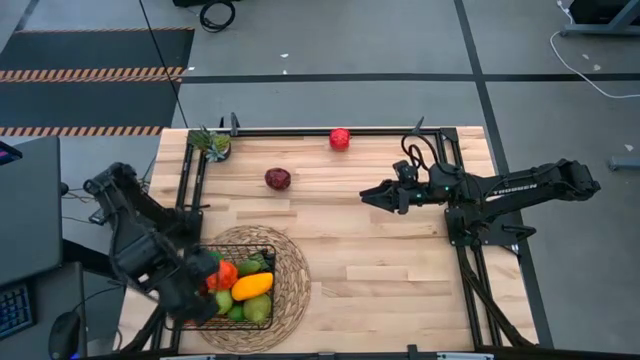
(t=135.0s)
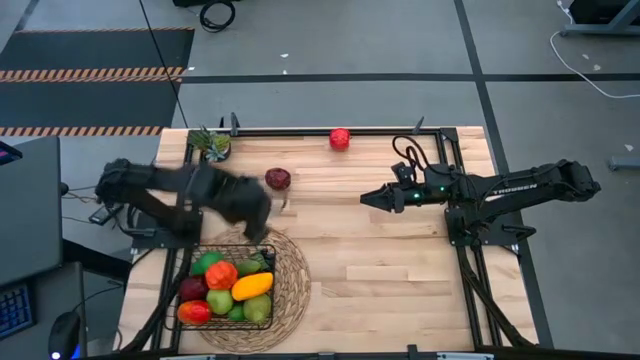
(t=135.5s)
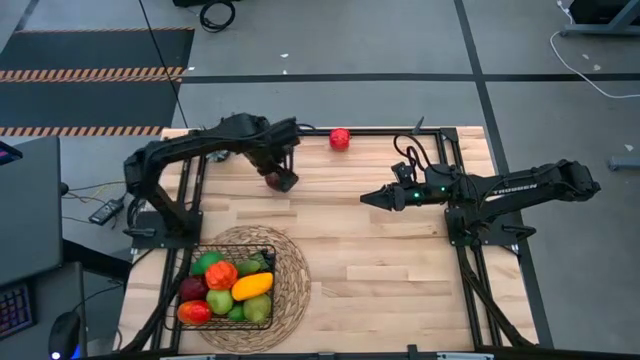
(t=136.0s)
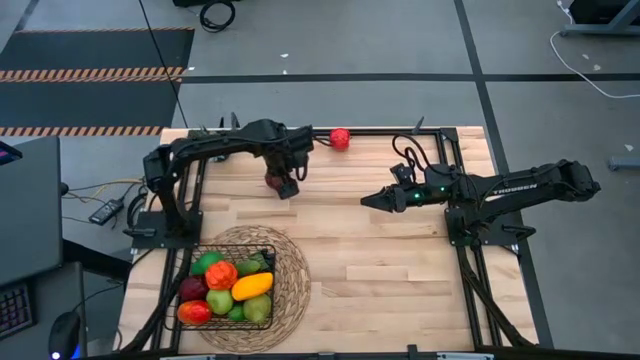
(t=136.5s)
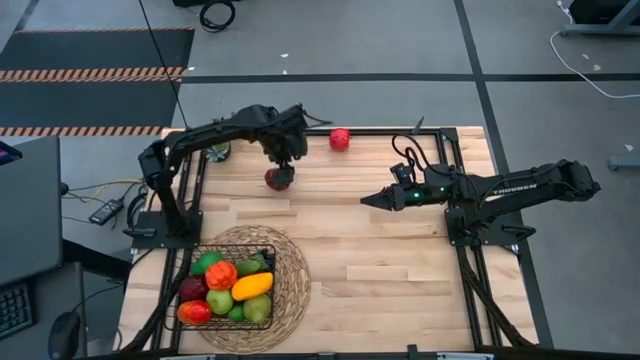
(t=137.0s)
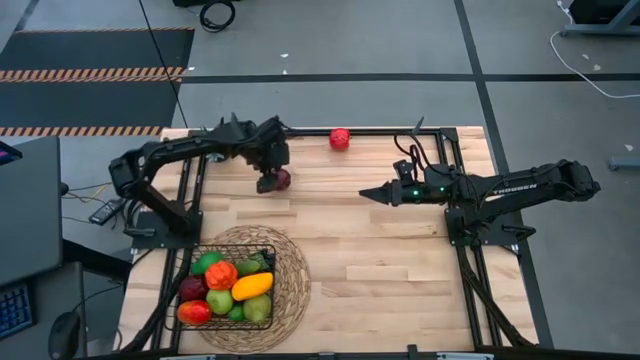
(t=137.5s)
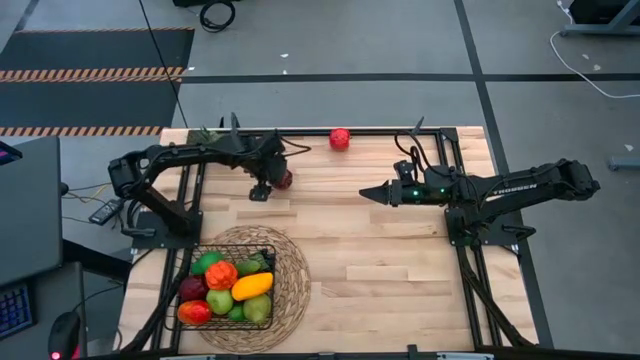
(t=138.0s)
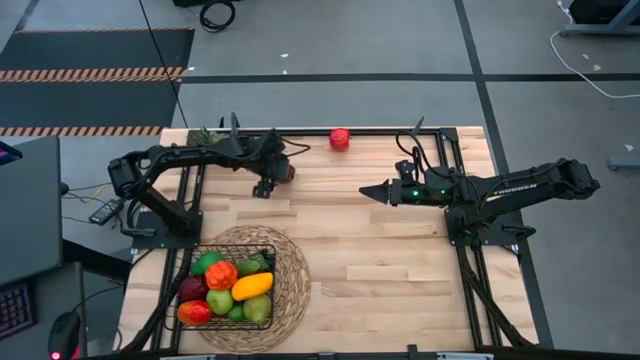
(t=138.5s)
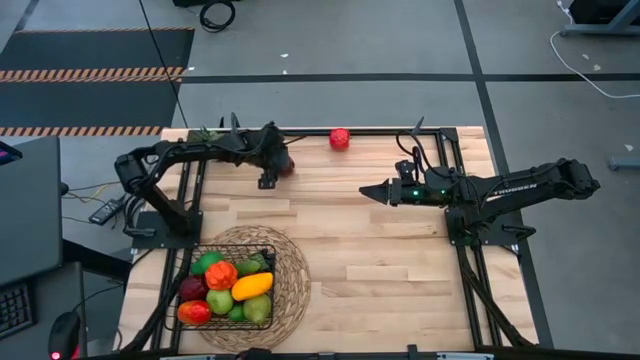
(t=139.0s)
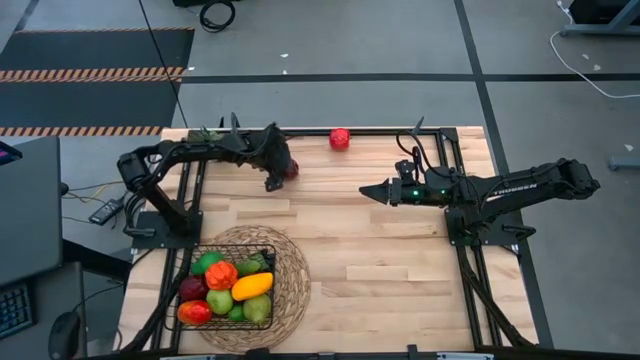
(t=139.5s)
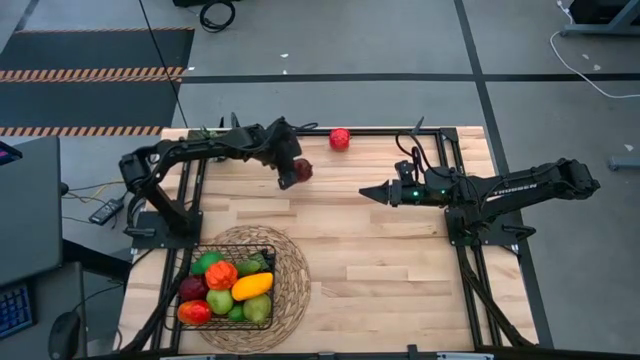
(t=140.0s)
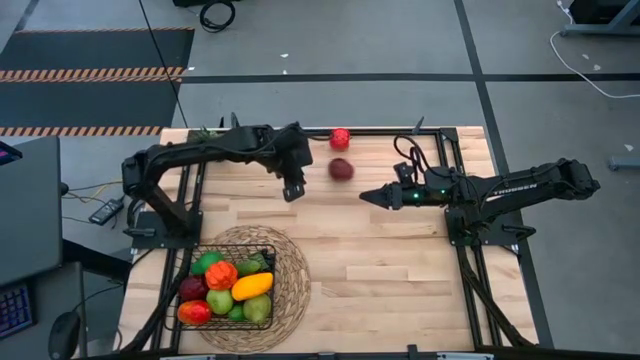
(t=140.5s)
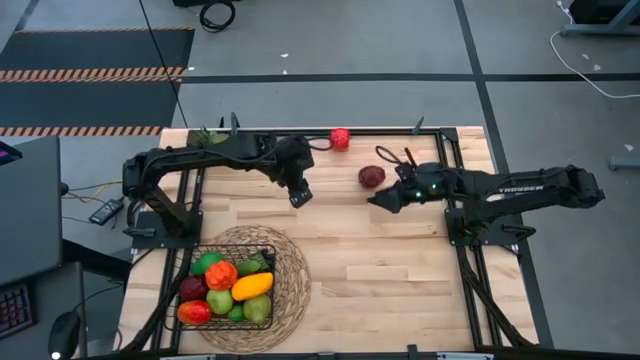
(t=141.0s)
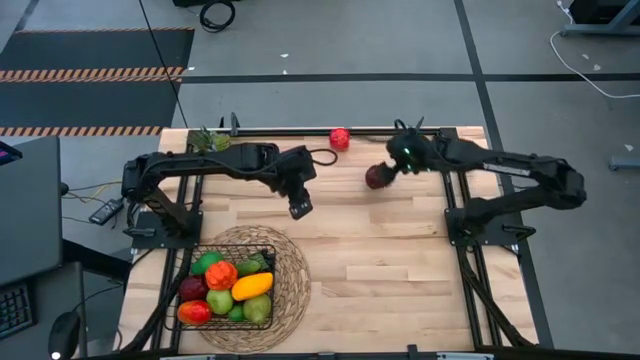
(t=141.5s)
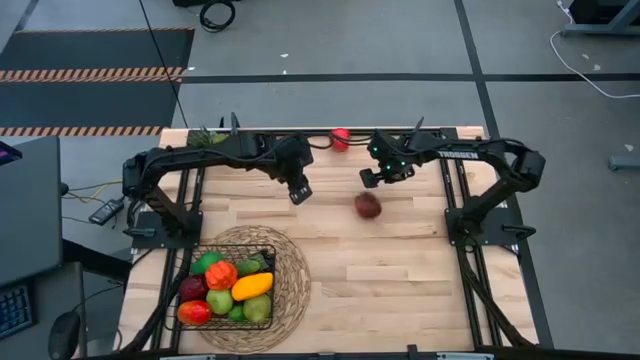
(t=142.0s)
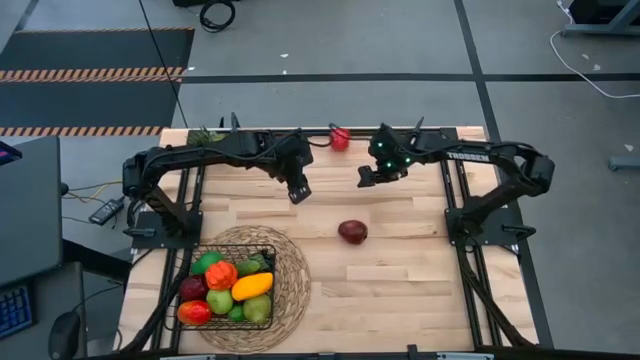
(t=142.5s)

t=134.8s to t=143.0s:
Task: Build produce basket
Put the dark red apple into the black wire basket

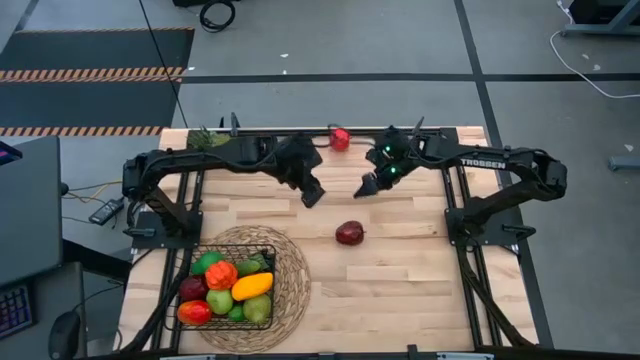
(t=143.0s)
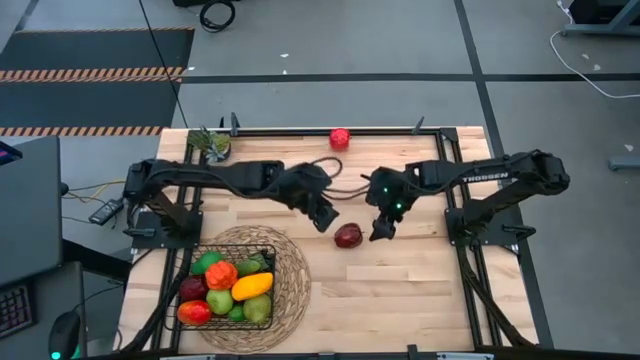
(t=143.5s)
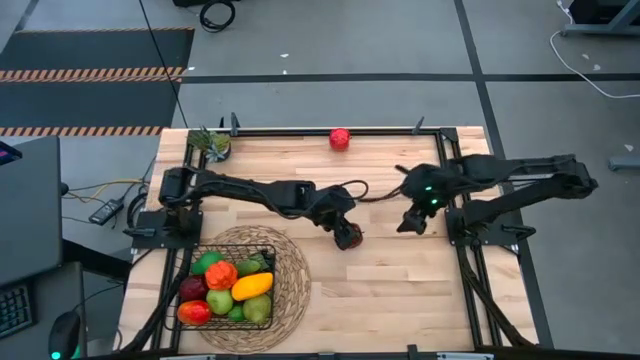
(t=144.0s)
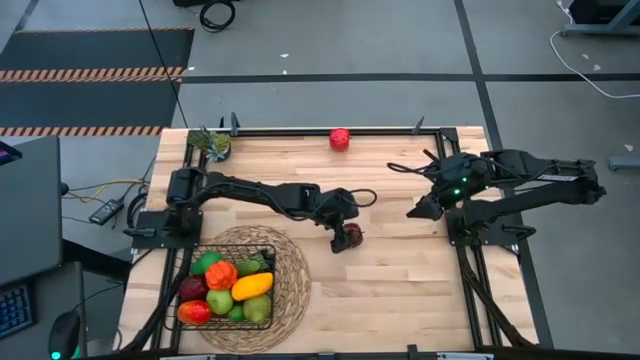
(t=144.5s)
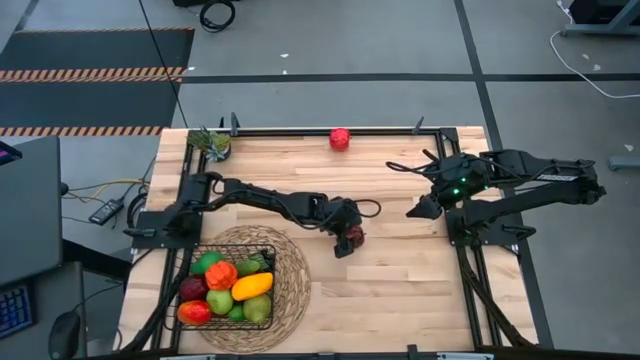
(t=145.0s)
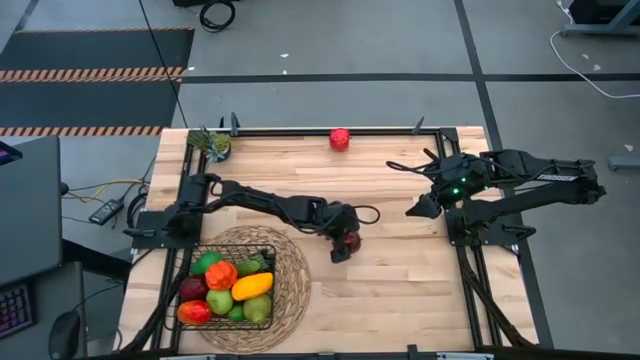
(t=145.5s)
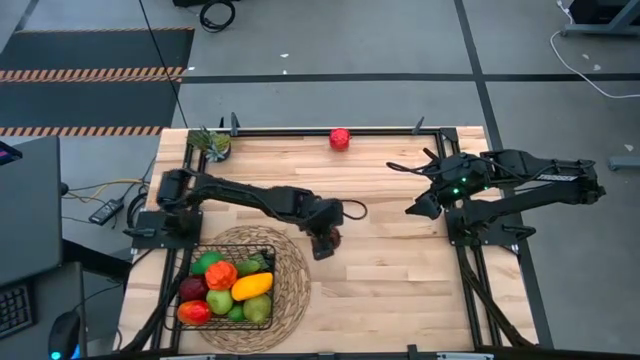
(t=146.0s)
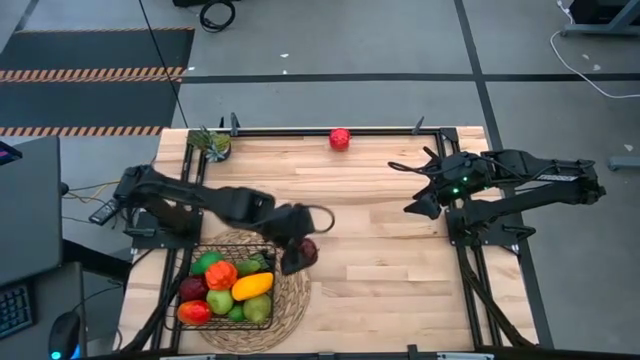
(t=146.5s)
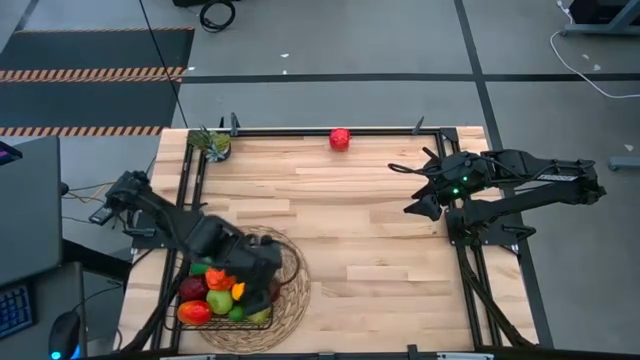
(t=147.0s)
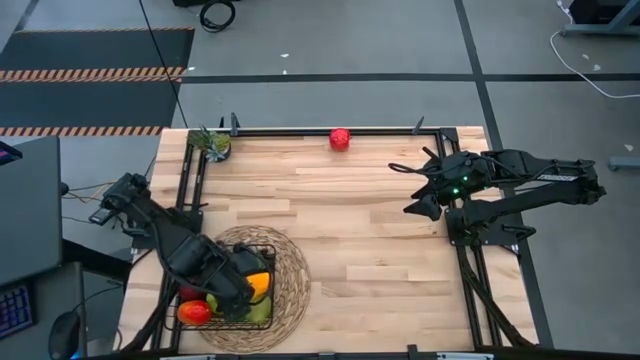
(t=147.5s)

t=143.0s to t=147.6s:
Put the dark red apple into the black wire basket

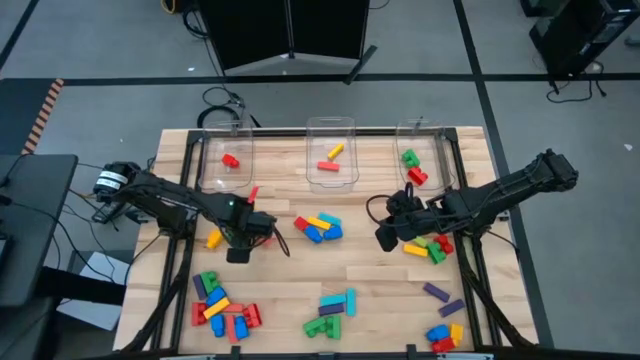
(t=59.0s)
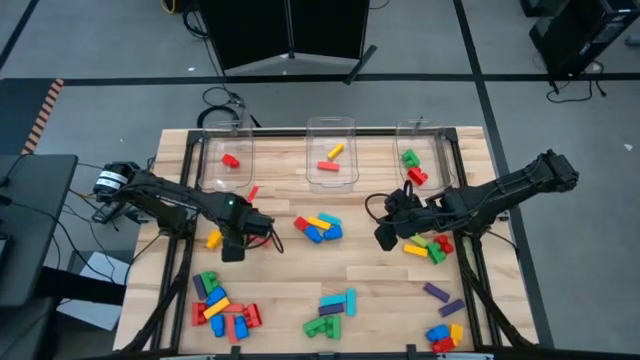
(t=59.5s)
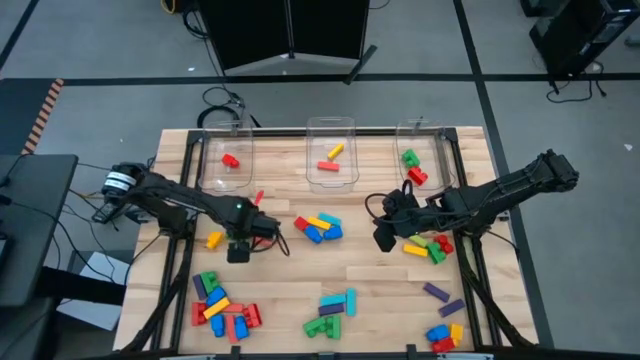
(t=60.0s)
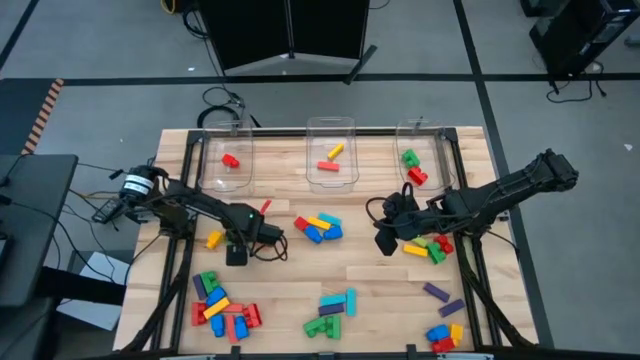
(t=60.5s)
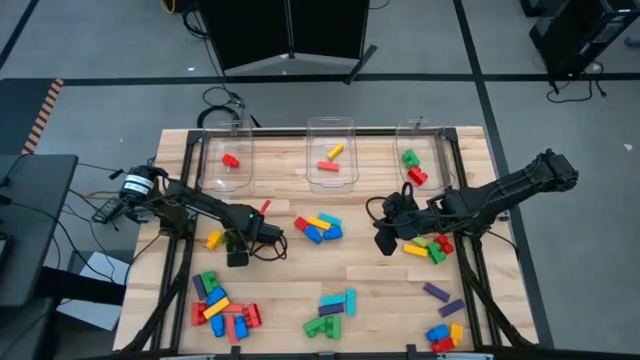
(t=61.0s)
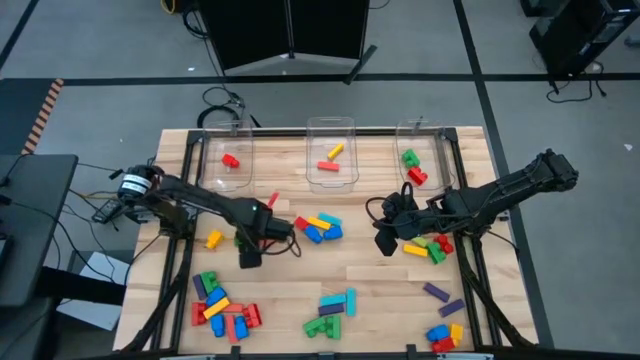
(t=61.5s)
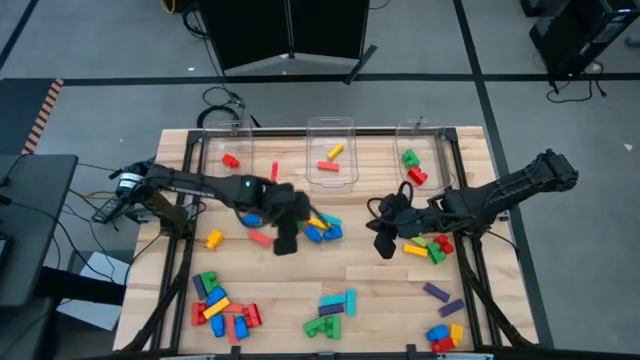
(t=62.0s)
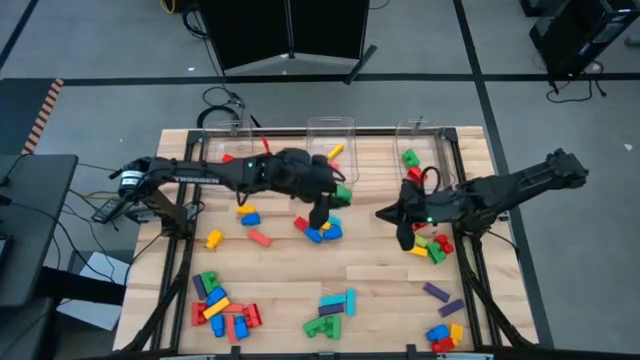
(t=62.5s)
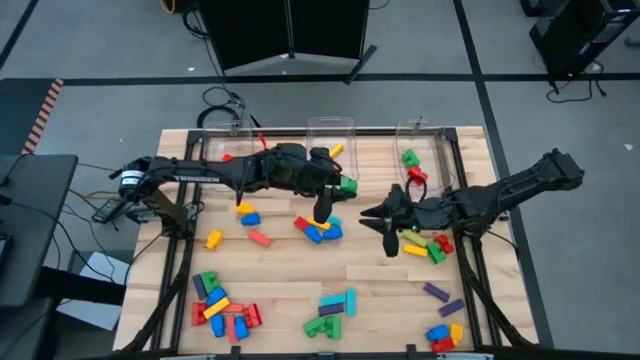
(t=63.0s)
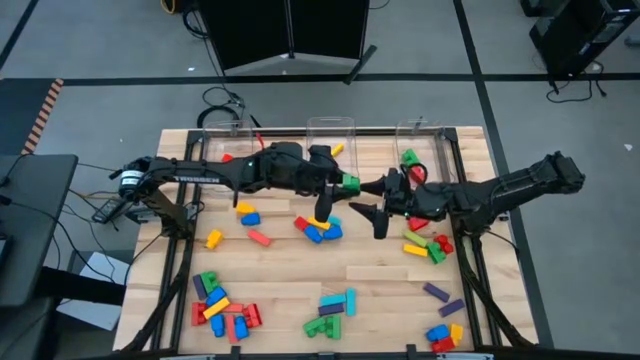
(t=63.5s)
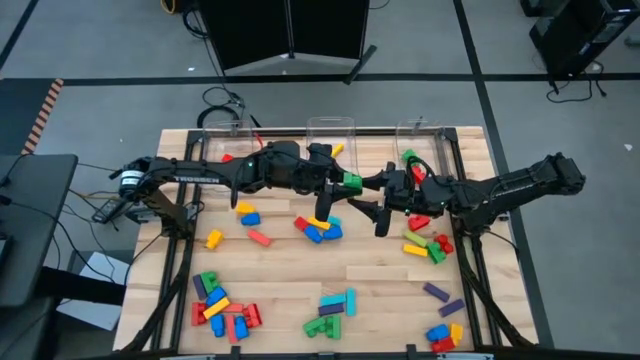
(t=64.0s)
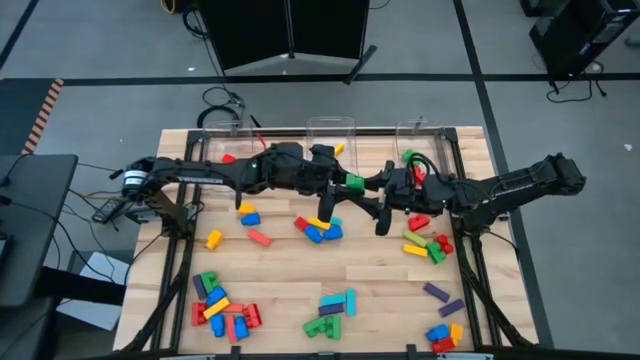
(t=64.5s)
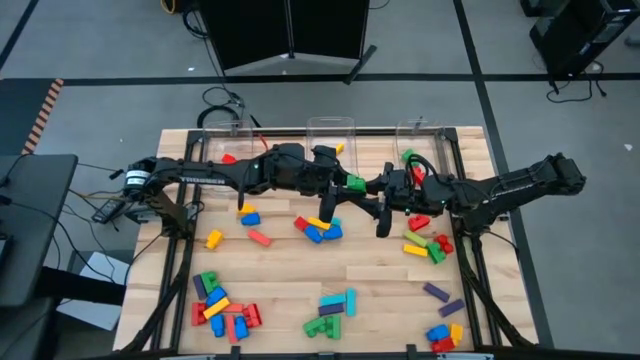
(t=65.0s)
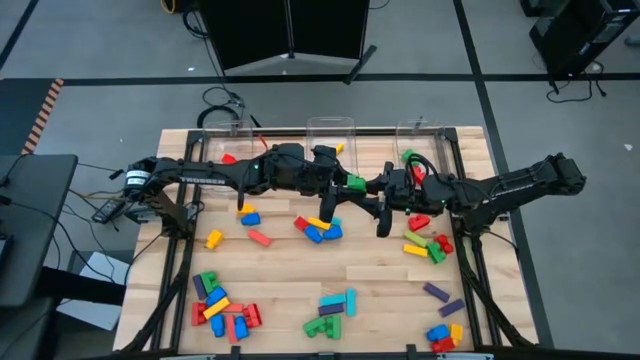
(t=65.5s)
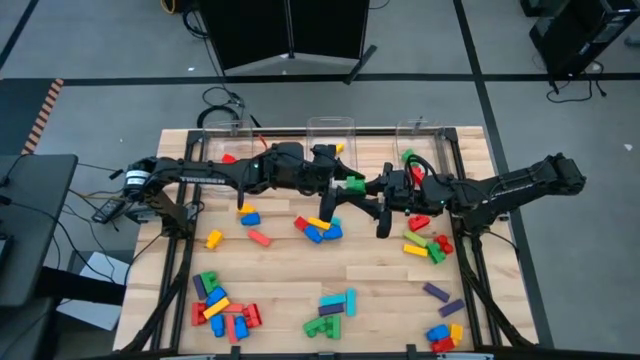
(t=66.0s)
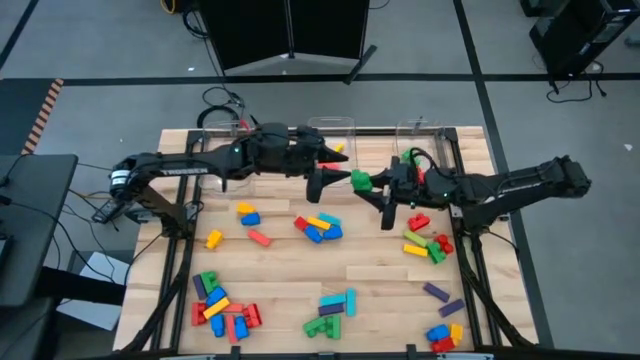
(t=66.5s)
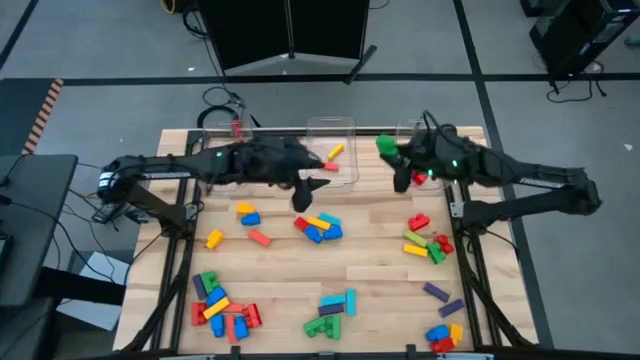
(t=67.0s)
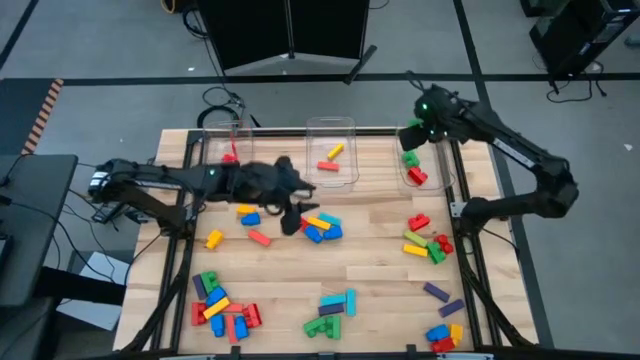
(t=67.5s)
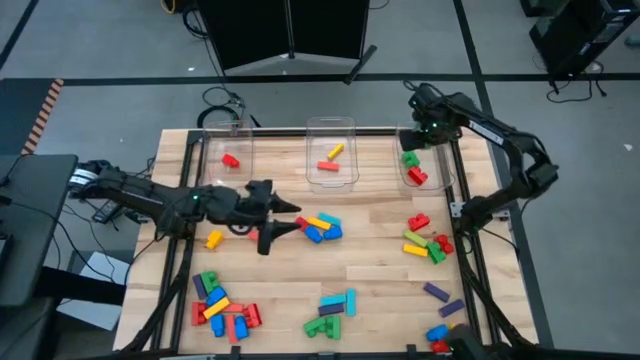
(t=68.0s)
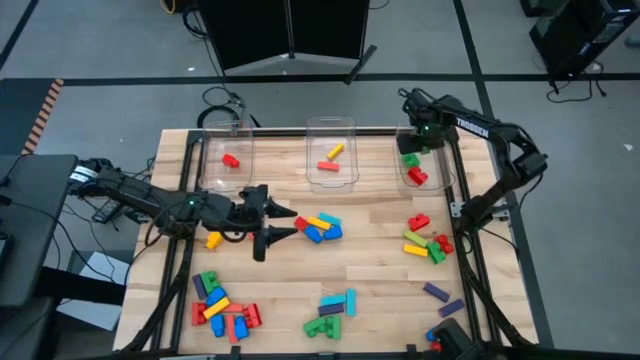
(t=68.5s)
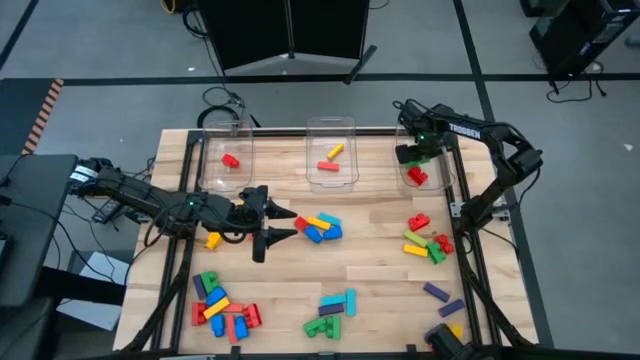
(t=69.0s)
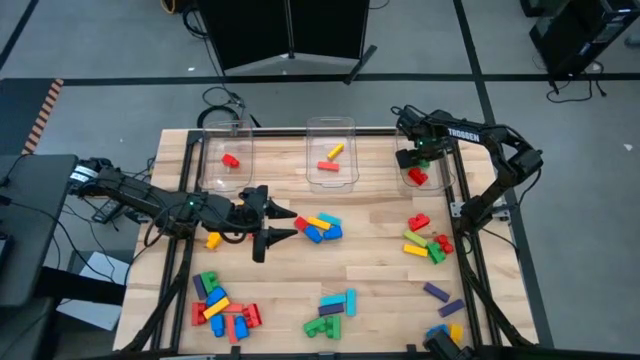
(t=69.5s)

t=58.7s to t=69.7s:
Task: Sort blocks by size
Put the green 2 stud game piece into the right transparent bin
